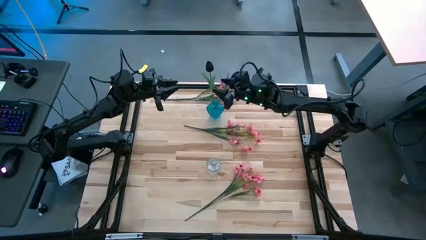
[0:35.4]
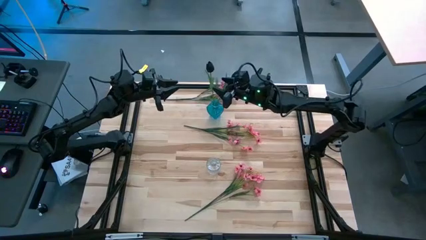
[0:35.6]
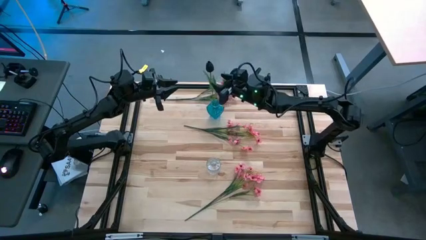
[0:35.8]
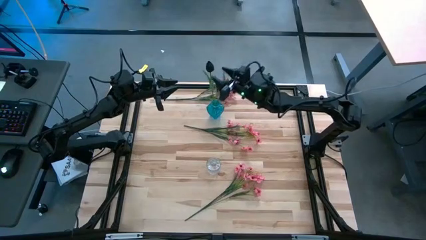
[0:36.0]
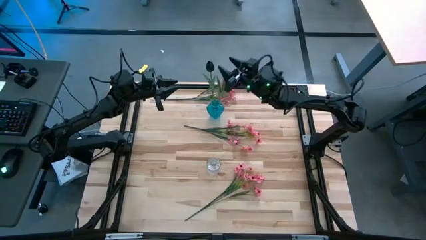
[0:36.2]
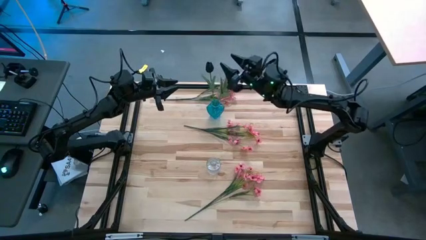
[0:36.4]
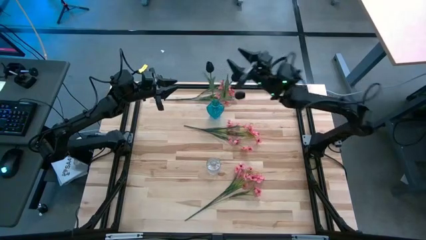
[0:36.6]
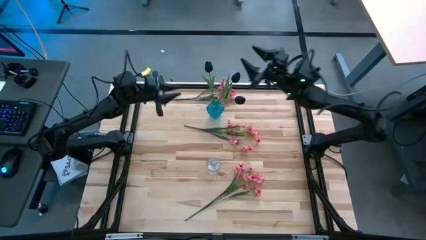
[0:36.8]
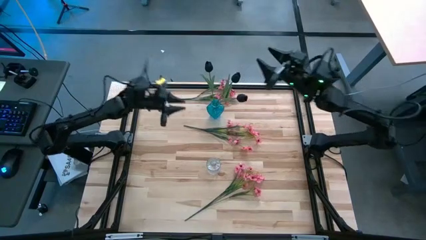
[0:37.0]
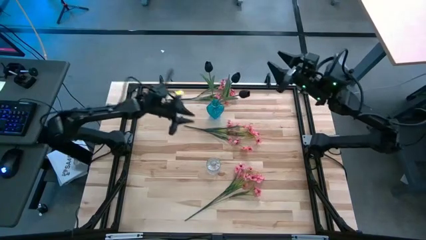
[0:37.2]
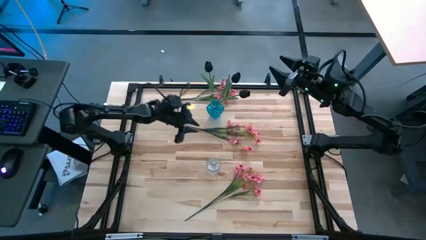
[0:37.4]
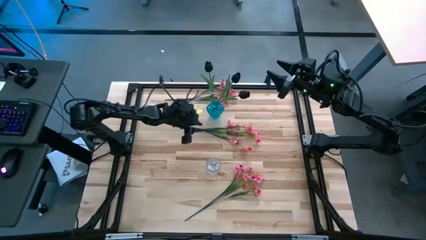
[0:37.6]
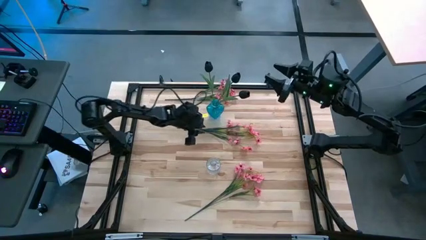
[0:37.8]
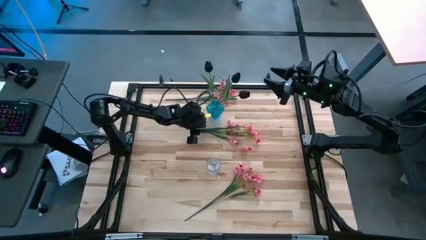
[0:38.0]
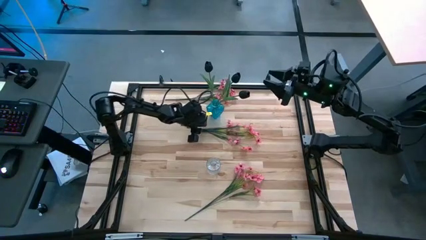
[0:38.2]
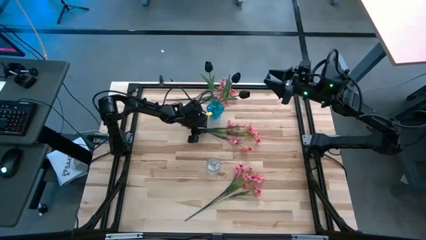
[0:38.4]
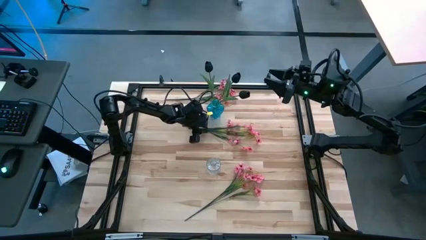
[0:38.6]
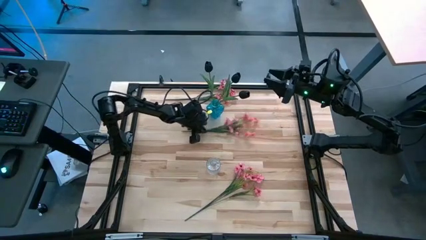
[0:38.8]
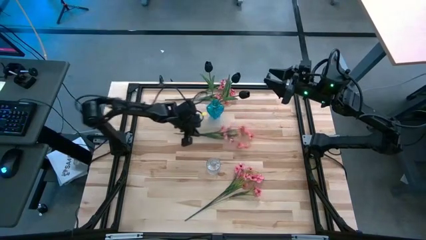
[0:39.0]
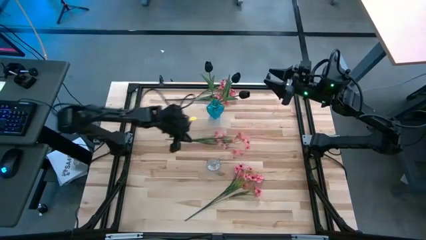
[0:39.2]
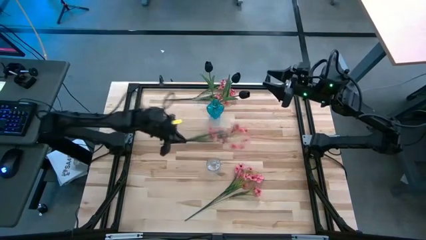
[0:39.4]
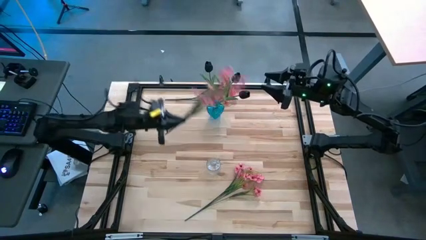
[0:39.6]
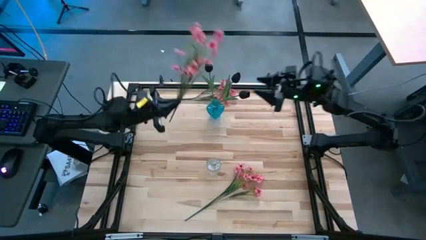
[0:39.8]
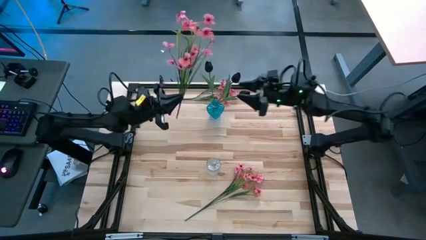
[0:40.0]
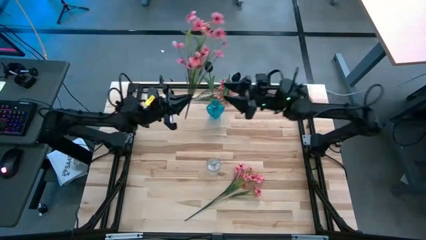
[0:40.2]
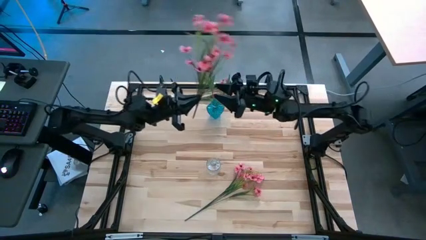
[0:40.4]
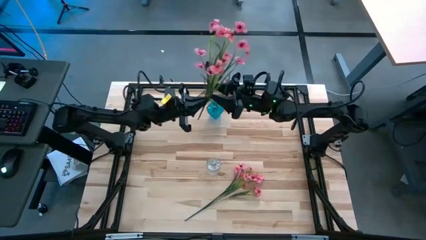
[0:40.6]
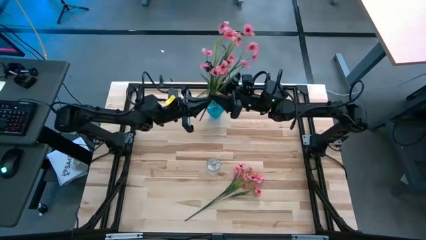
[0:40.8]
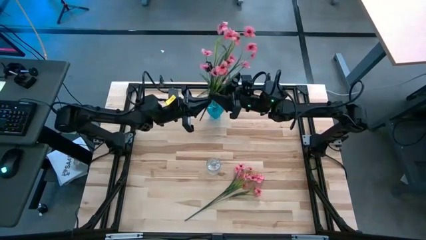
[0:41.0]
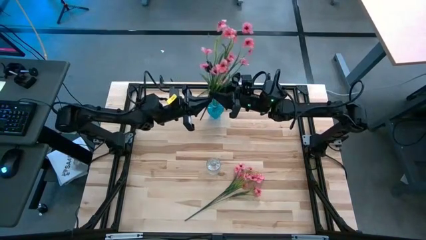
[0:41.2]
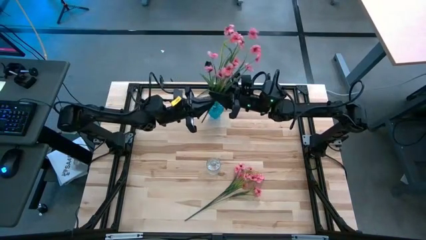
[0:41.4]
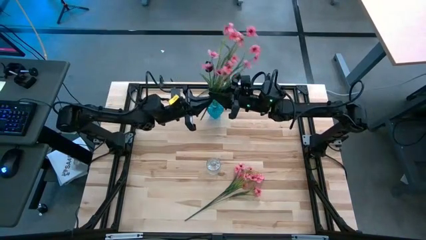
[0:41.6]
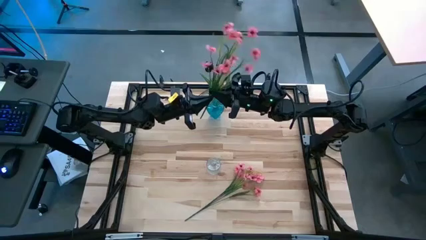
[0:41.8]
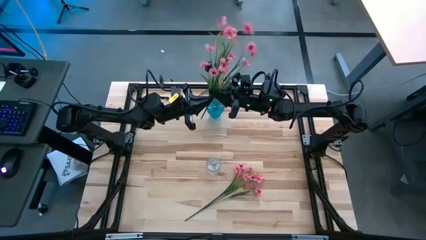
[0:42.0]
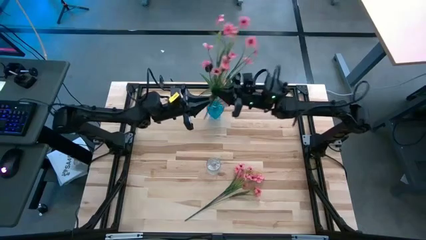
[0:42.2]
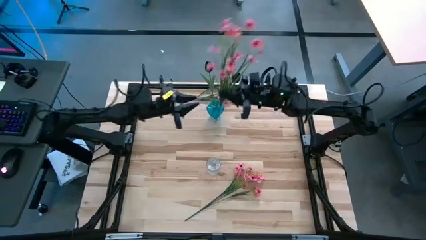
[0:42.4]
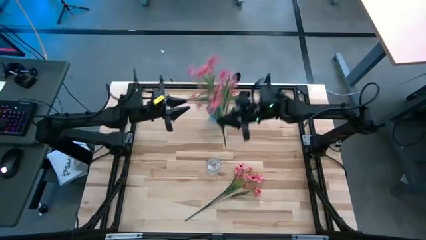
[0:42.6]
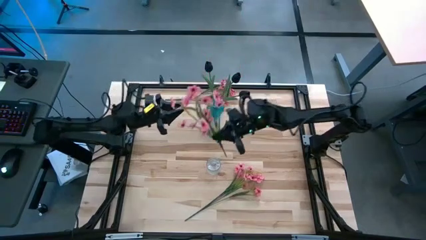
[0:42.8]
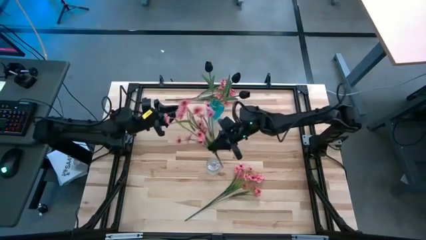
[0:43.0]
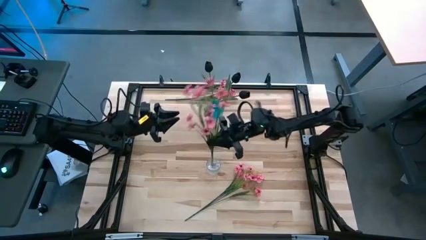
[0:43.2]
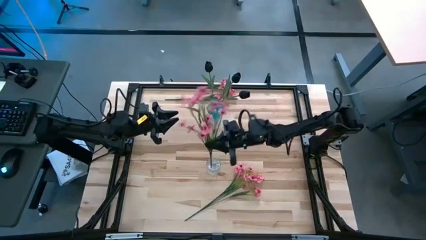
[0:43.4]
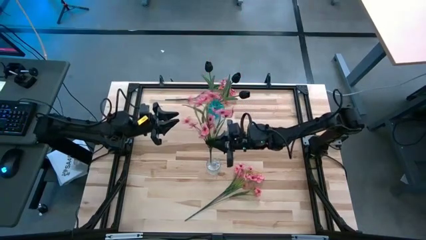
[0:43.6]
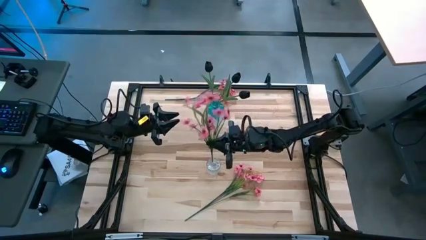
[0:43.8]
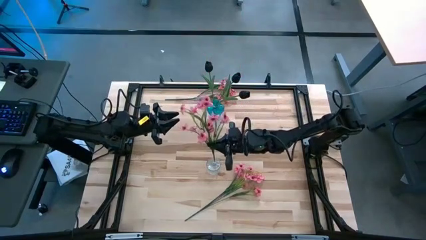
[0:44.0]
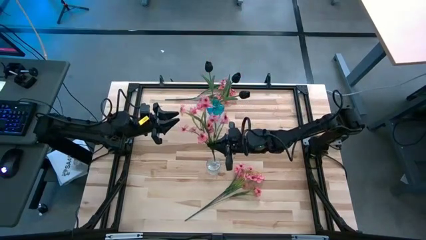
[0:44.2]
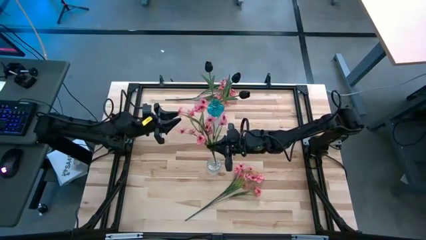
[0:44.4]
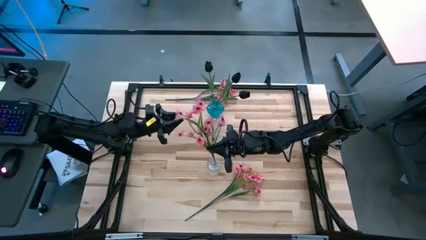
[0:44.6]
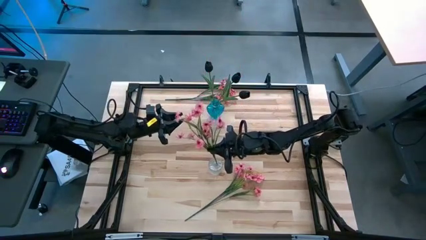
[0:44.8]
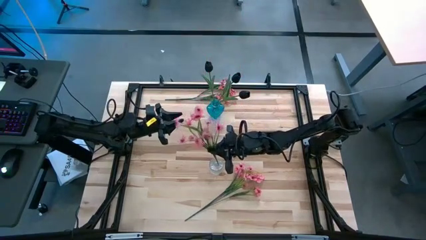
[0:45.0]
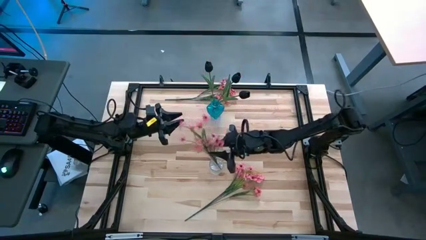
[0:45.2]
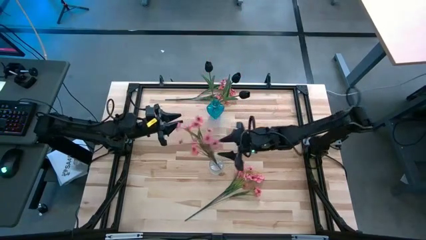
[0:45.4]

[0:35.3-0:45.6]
Task: Sort flowers into vase by color
Put the middle pink flower into the transparent vase
